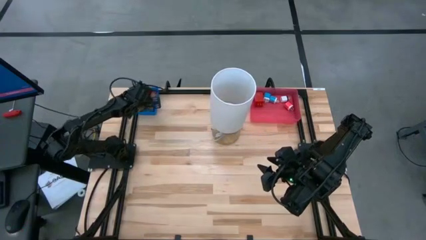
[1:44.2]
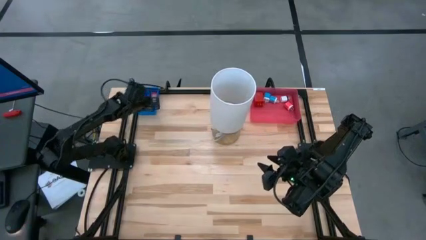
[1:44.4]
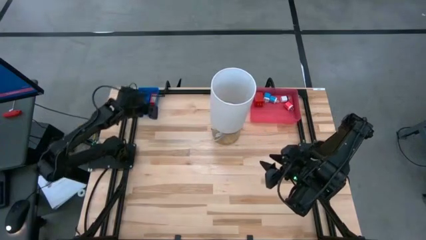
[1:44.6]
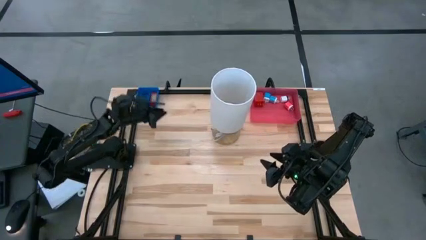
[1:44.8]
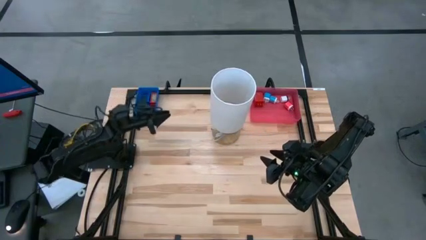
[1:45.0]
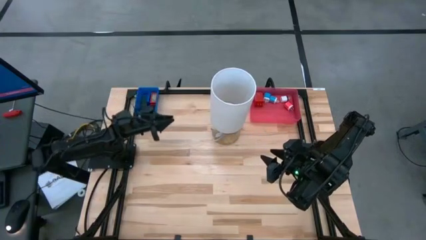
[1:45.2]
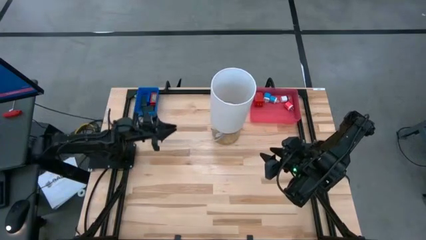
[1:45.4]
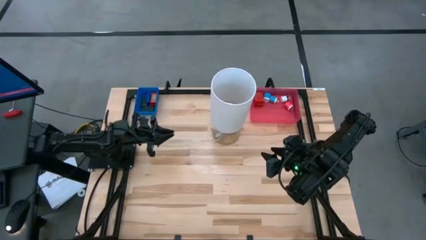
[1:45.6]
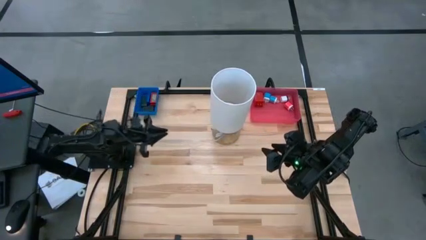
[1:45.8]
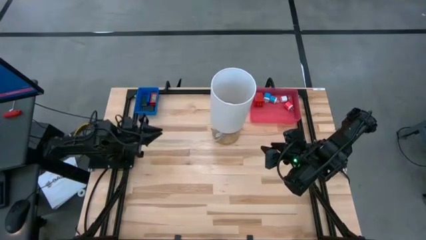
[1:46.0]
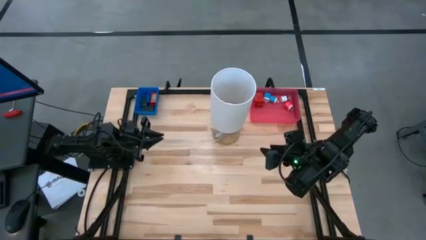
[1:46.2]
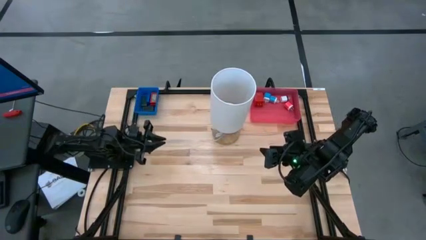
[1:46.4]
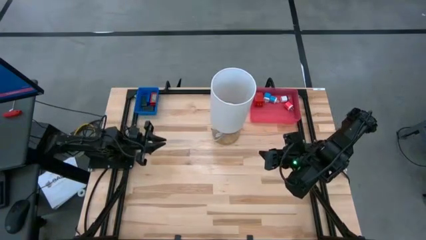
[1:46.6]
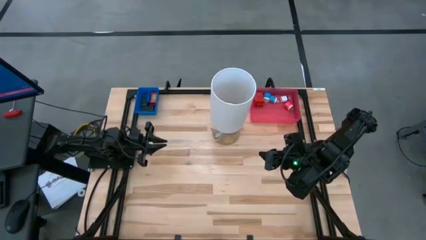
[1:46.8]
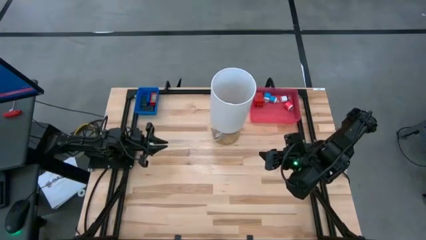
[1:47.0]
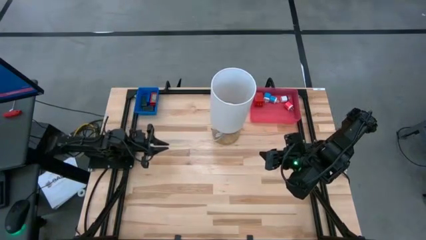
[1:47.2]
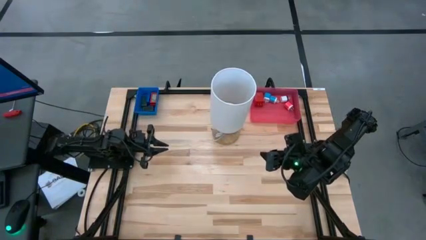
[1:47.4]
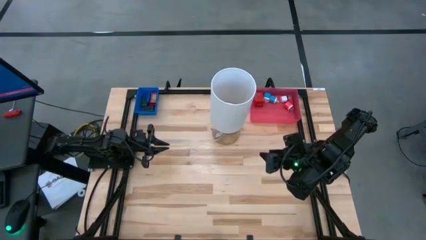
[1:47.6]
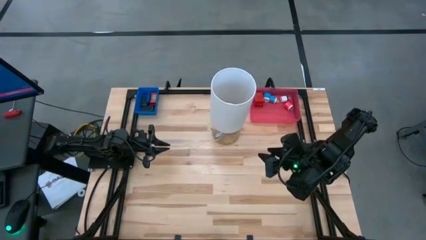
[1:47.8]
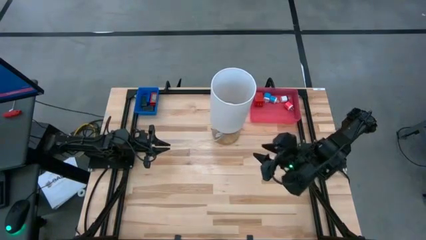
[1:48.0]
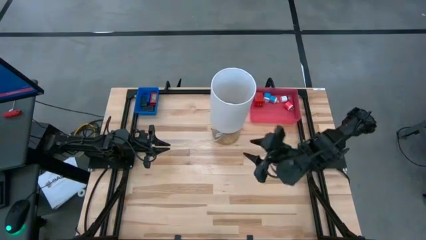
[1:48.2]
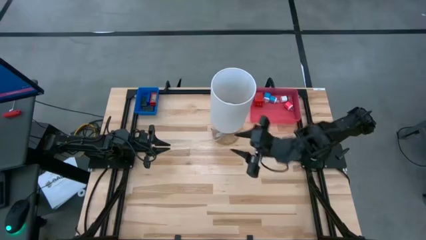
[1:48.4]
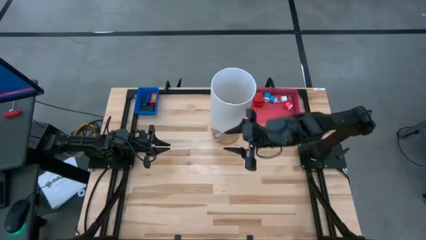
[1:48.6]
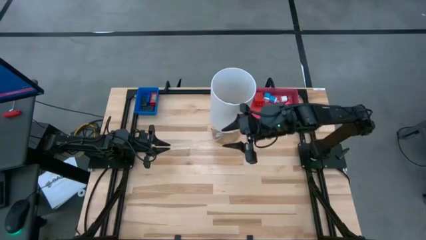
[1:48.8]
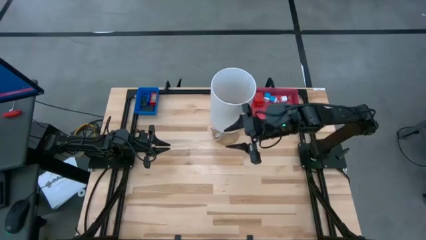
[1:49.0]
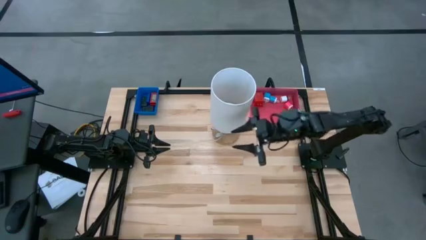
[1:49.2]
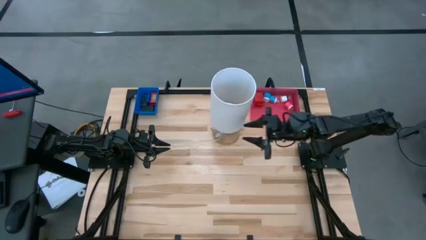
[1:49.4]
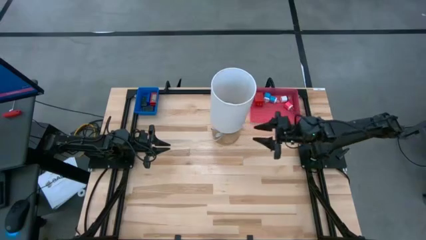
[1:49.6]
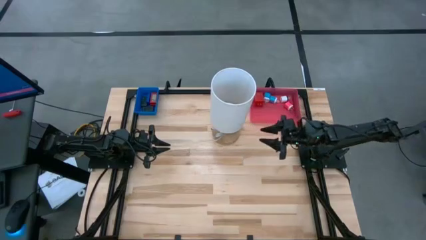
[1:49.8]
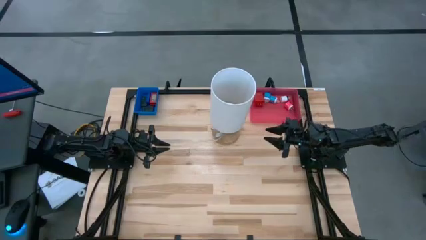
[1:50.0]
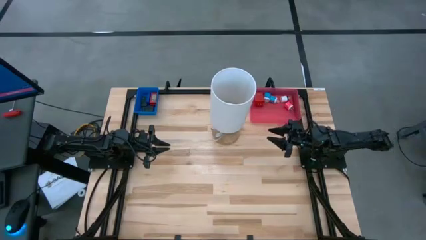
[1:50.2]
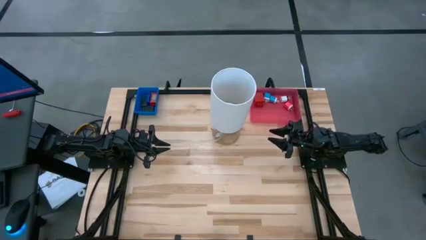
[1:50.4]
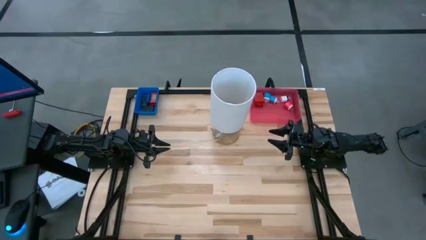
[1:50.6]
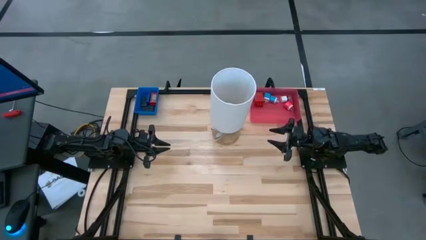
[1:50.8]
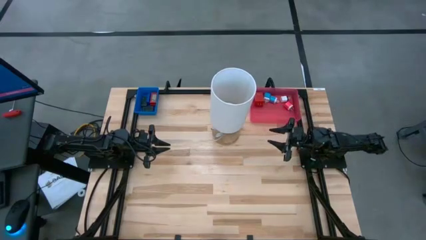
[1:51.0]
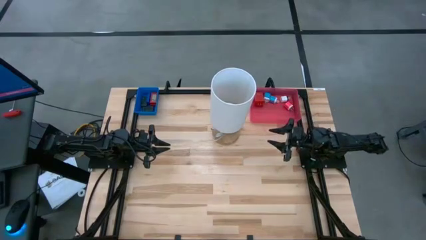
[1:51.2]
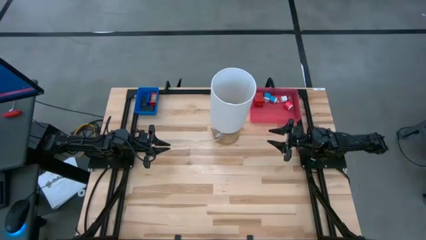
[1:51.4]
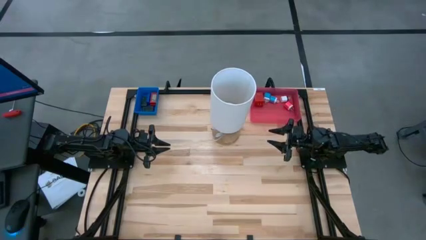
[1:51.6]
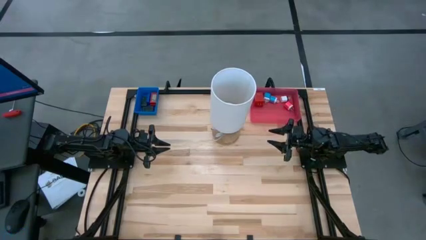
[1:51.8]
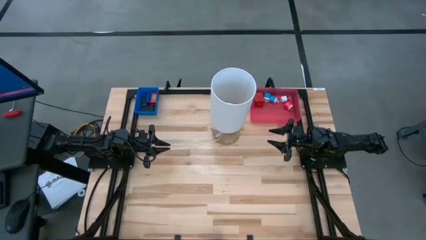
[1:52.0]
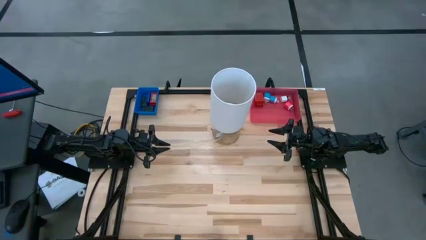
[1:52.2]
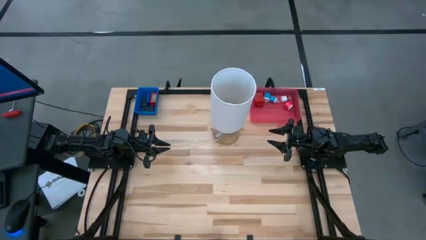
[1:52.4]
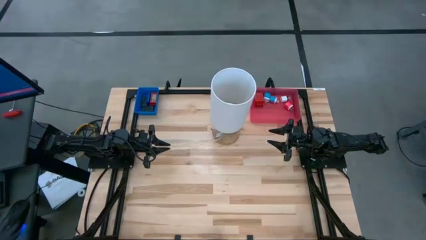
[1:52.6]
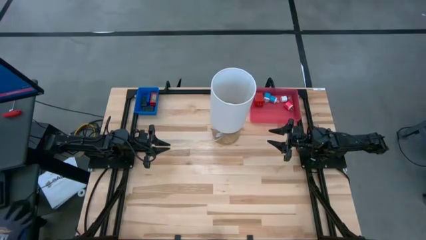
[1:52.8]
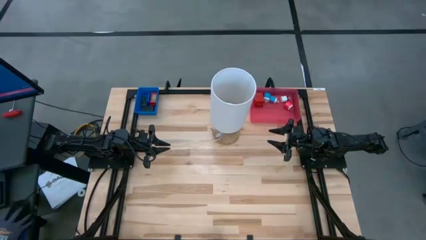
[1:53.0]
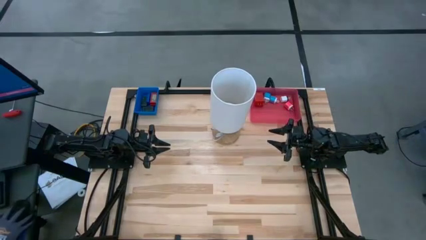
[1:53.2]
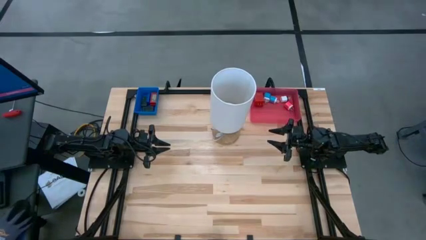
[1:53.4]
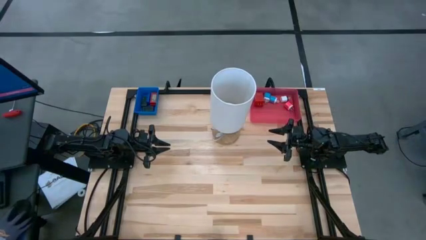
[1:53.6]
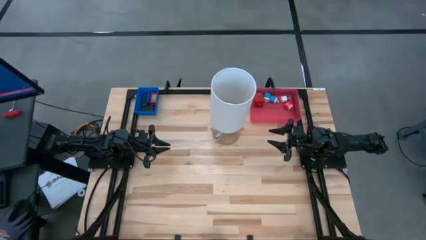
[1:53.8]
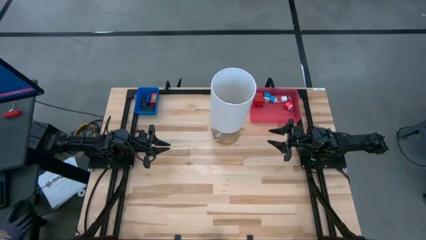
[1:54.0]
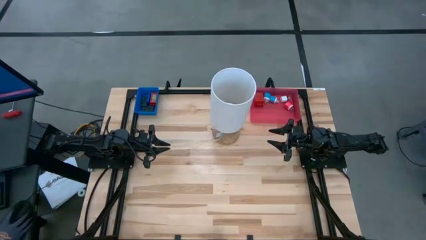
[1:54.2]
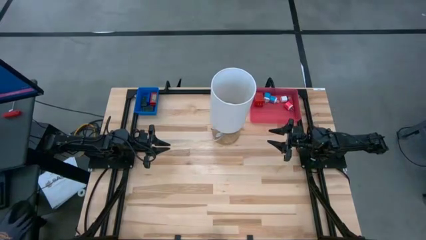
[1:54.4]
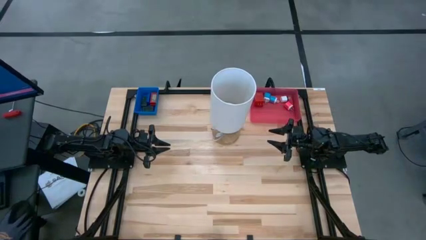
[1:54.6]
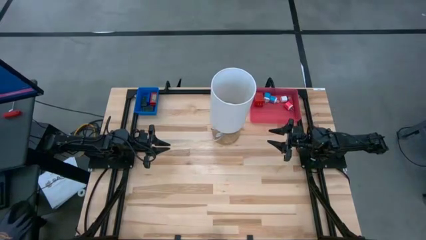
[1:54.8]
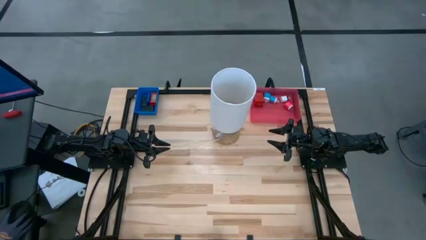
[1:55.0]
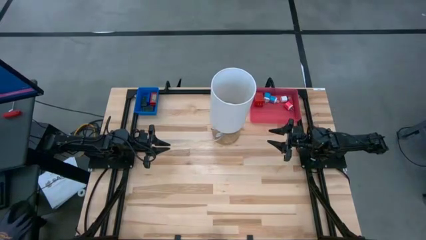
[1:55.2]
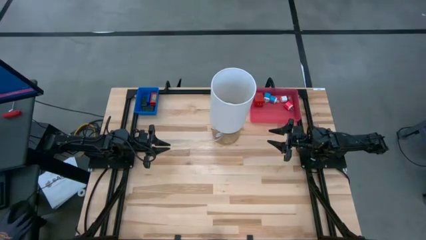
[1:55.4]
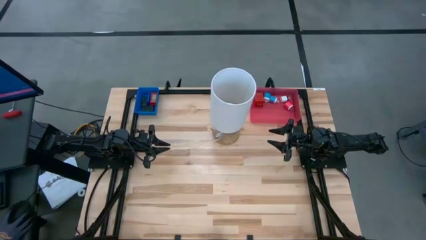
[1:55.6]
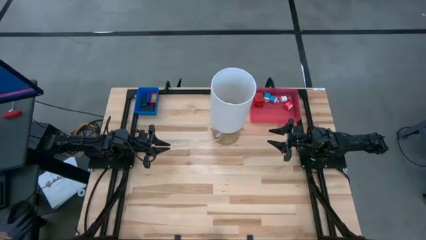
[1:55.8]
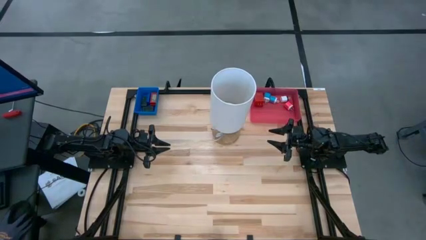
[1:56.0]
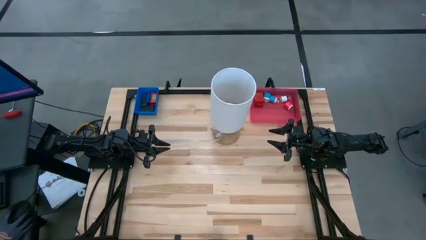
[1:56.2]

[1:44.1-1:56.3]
Task: Pick & Place Office items
Return to Home Position

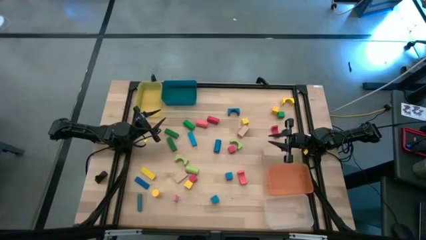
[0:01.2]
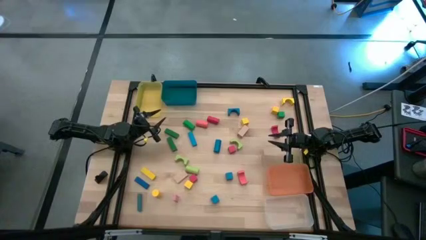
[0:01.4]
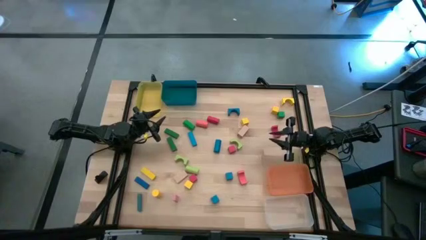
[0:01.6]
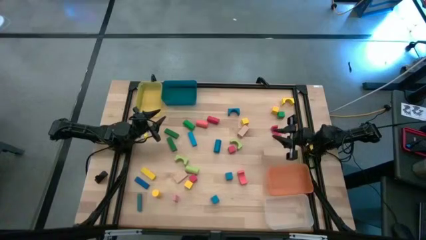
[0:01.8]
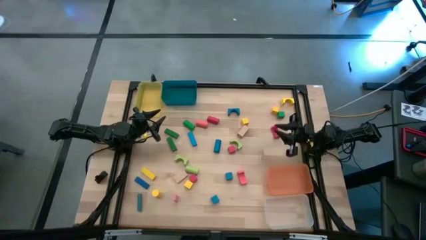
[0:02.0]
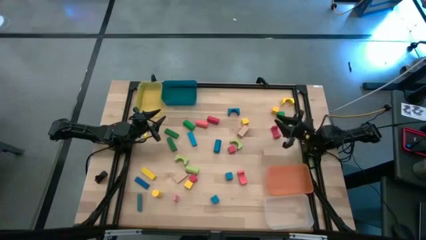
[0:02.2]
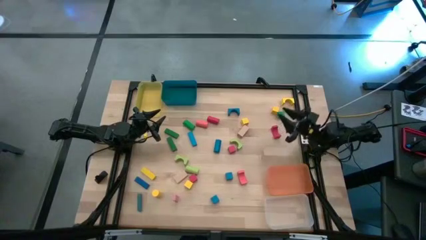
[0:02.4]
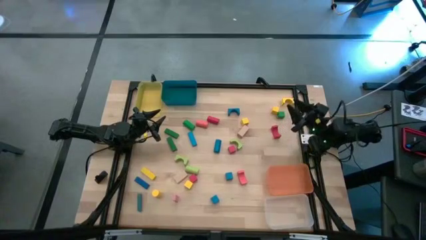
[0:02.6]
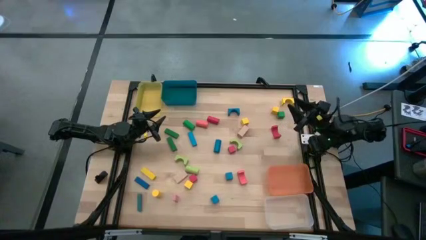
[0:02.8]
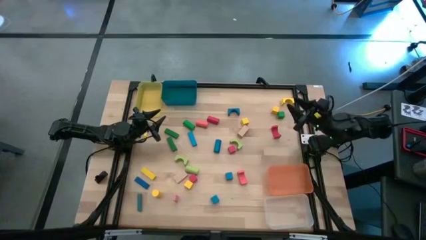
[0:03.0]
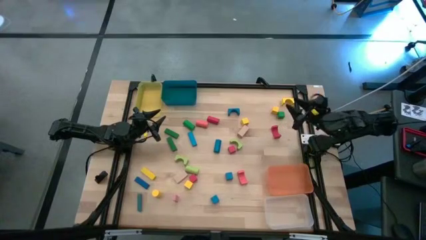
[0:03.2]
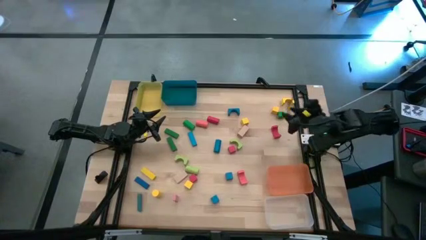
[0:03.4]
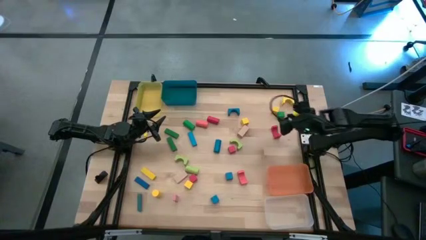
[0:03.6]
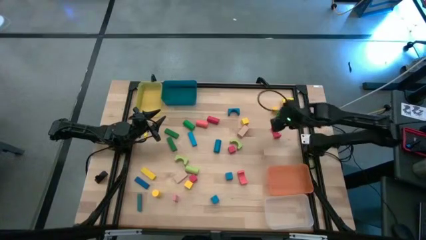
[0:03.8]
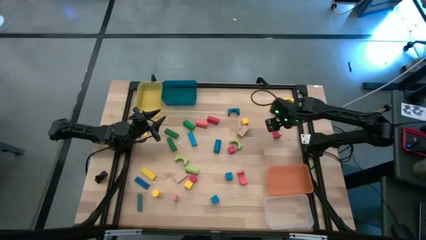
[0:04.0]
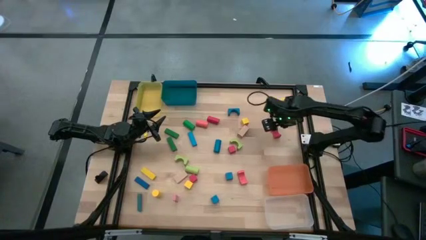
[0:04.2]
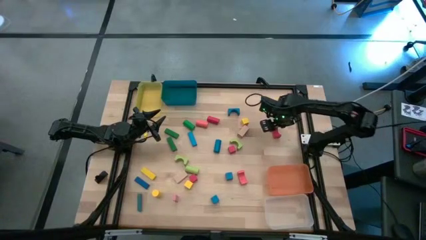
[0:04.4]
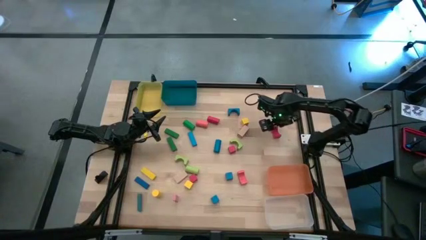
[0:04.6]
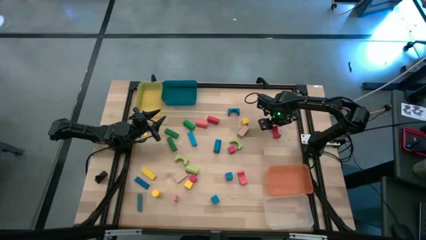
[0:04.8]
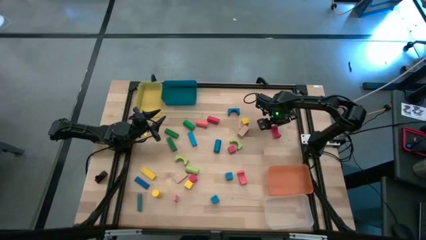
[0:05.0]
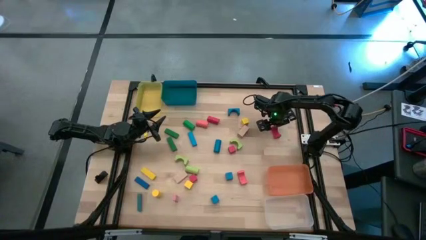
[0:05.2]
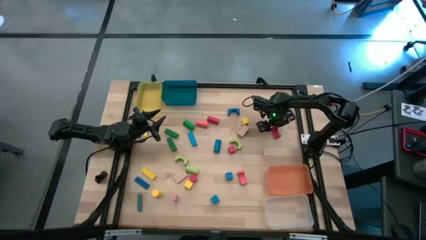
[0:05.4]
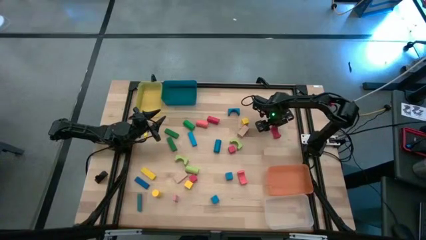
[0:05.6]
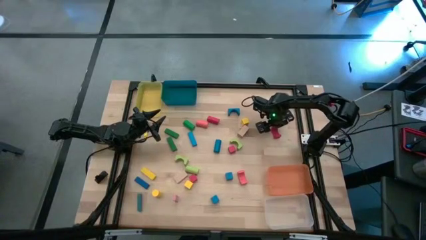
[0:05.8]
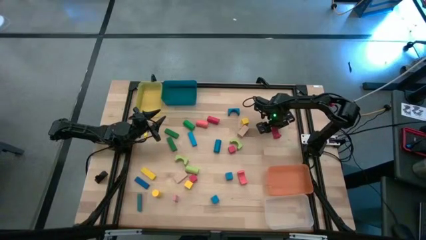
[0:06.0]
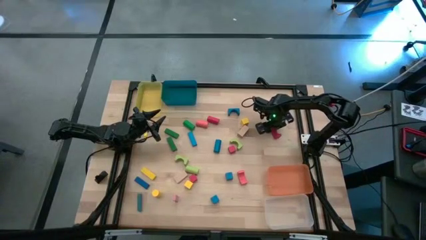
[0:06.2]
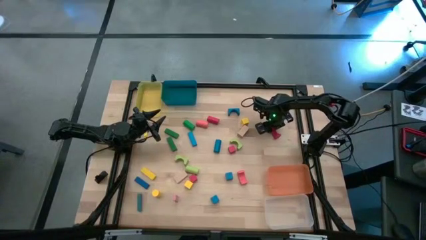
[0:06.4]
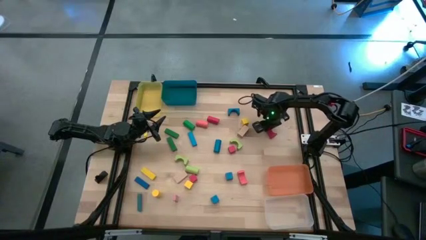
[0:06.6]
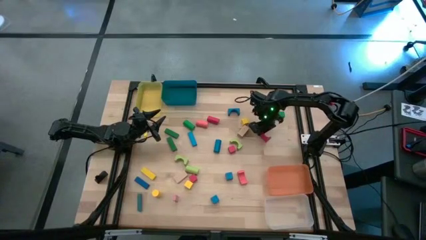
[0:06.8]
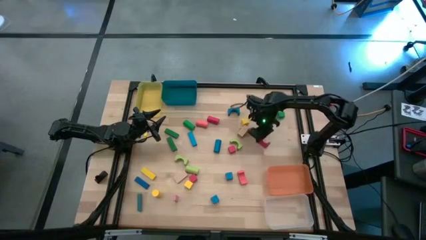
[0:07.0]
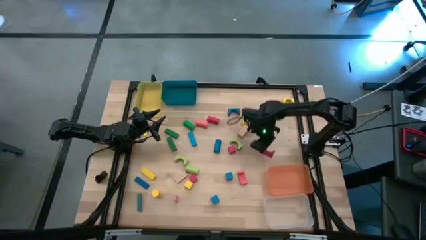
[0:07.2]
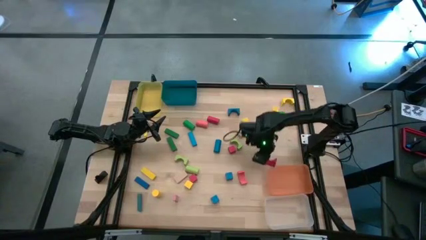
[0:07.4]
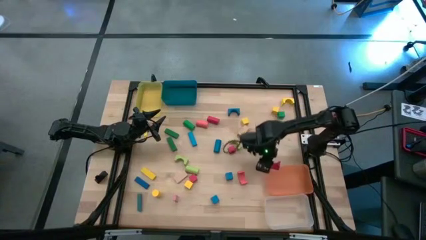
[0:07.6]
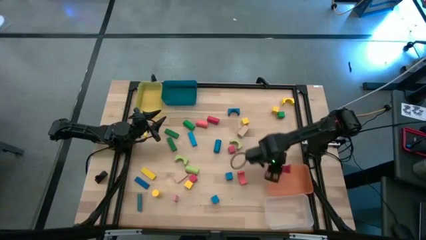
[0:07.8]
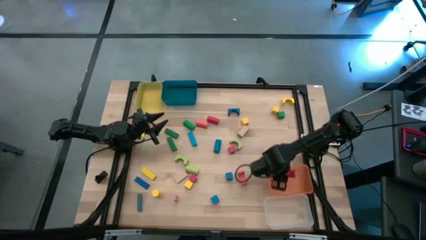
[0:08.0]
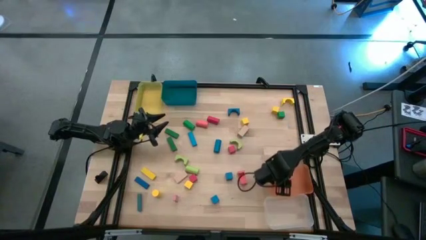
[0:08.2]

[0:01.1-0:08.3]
Task: Sort blocks by size
Put the red arch block into the orange bin
